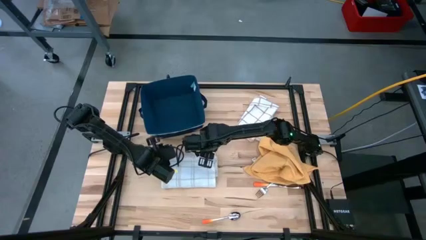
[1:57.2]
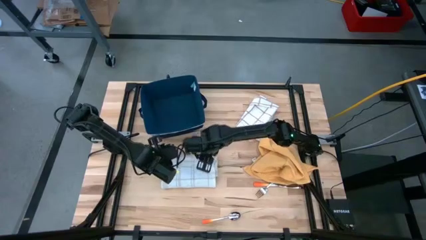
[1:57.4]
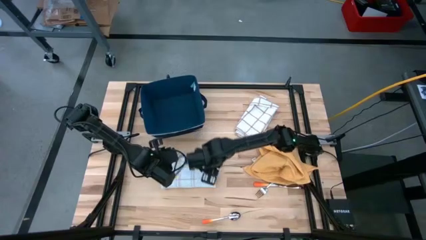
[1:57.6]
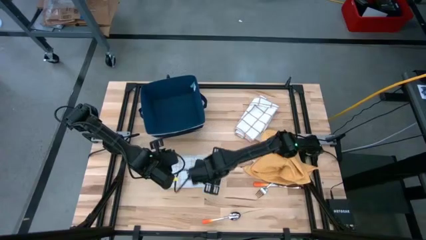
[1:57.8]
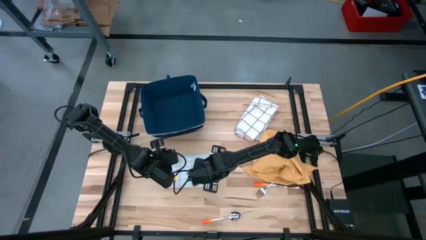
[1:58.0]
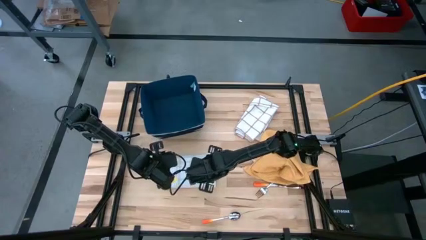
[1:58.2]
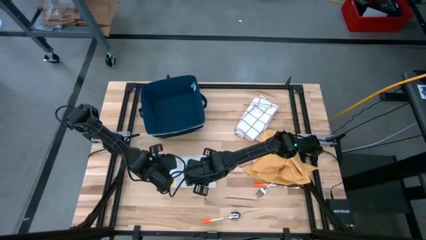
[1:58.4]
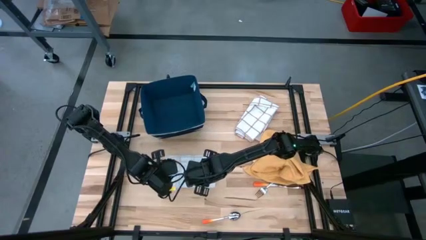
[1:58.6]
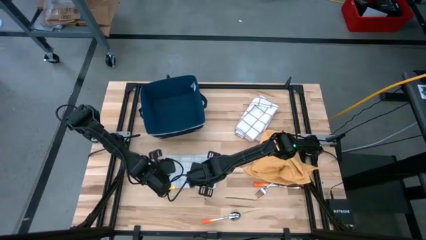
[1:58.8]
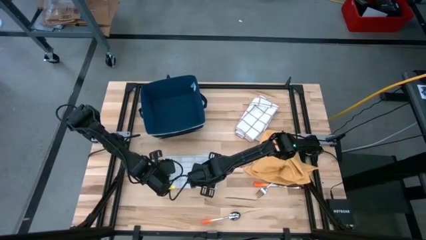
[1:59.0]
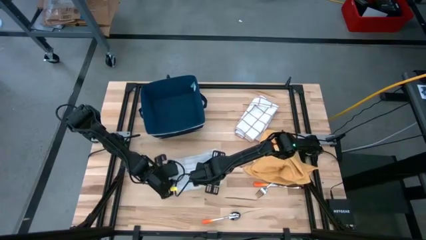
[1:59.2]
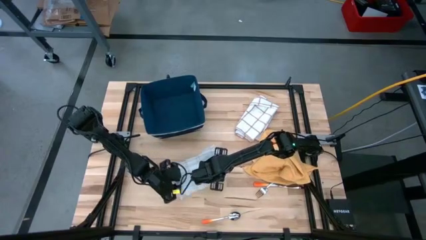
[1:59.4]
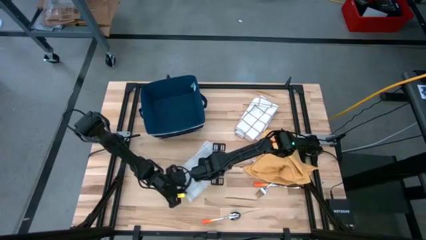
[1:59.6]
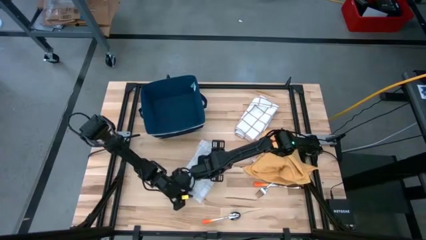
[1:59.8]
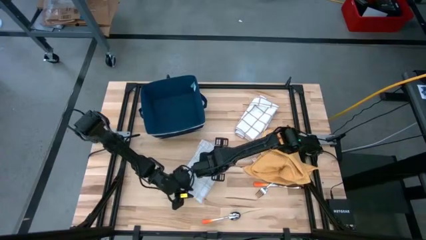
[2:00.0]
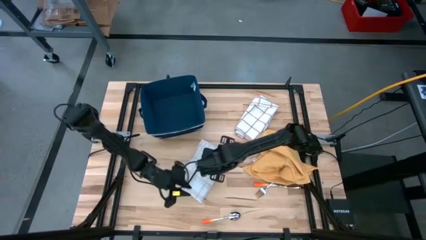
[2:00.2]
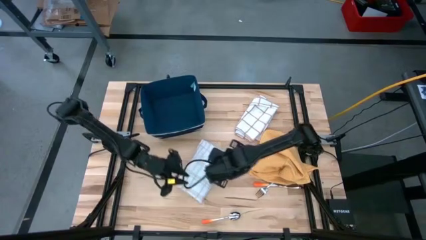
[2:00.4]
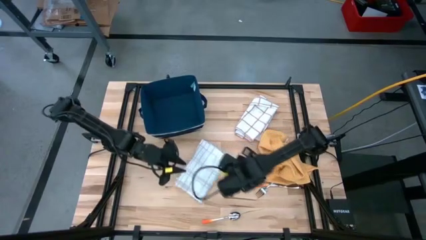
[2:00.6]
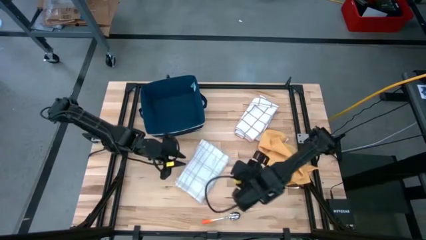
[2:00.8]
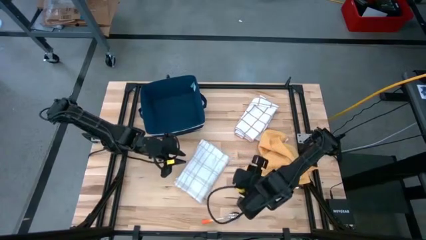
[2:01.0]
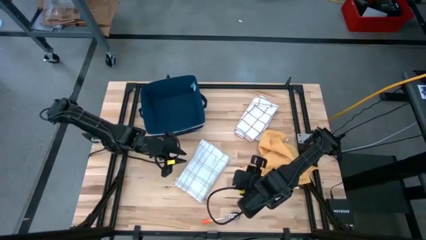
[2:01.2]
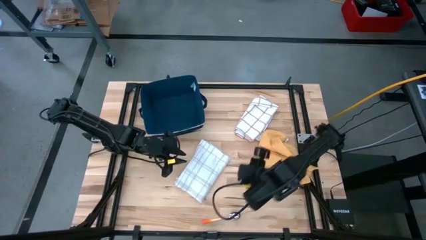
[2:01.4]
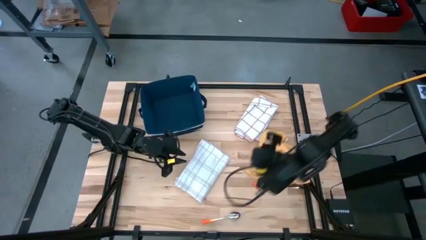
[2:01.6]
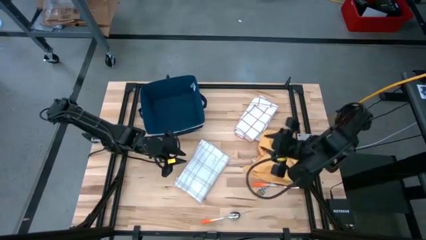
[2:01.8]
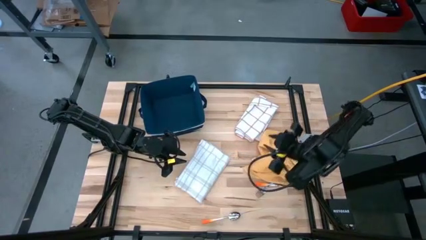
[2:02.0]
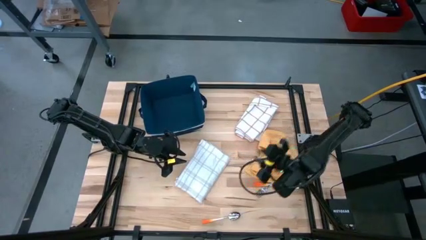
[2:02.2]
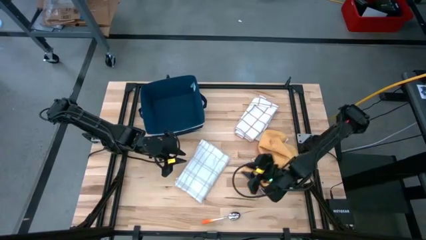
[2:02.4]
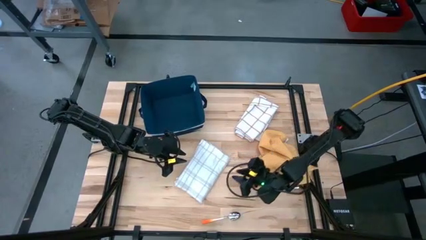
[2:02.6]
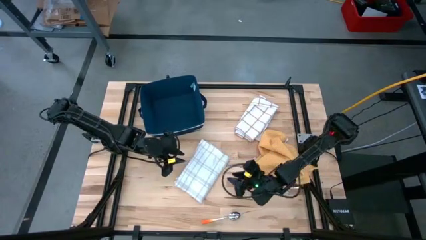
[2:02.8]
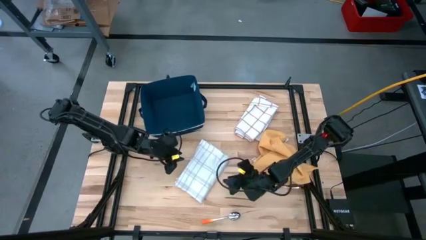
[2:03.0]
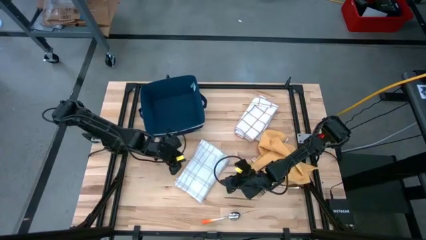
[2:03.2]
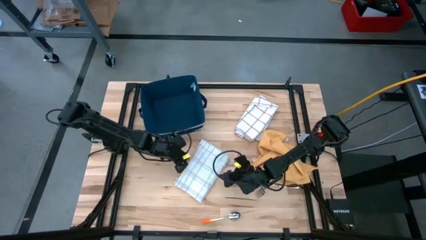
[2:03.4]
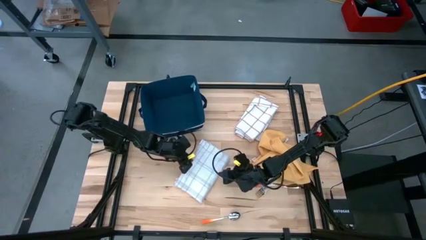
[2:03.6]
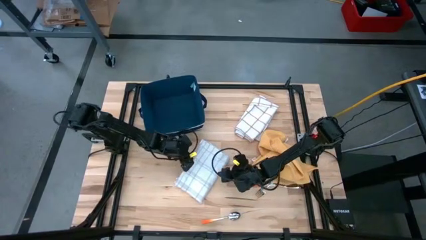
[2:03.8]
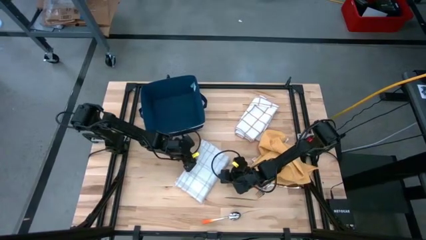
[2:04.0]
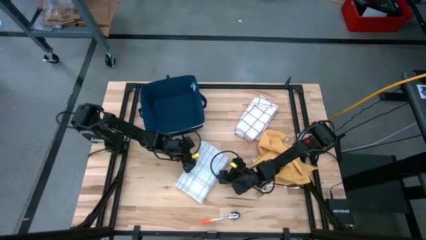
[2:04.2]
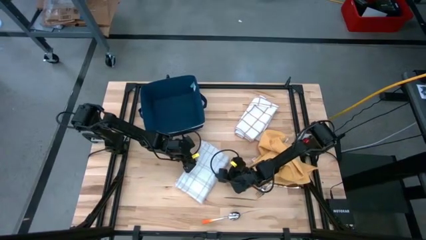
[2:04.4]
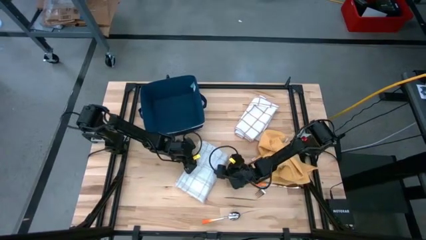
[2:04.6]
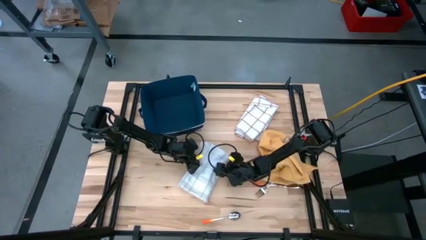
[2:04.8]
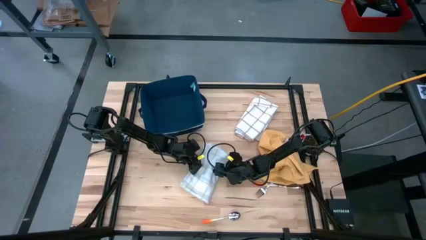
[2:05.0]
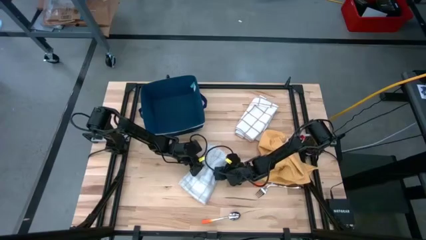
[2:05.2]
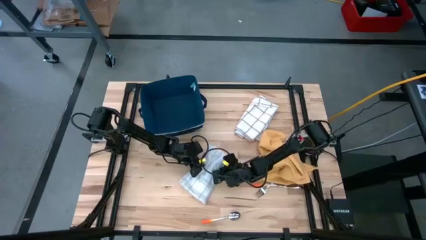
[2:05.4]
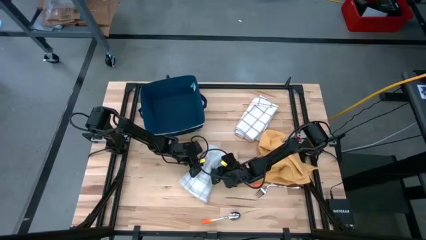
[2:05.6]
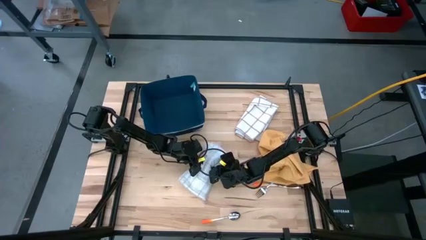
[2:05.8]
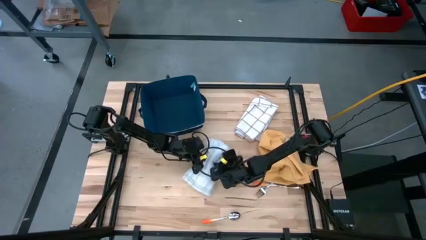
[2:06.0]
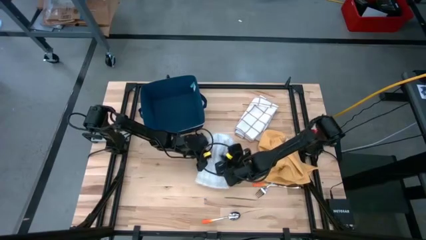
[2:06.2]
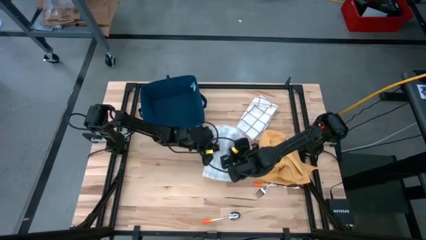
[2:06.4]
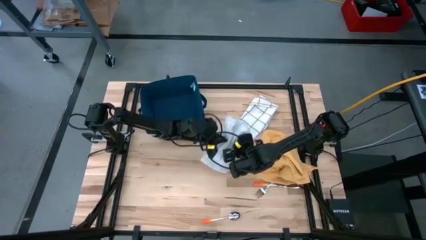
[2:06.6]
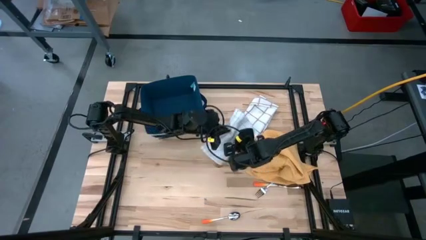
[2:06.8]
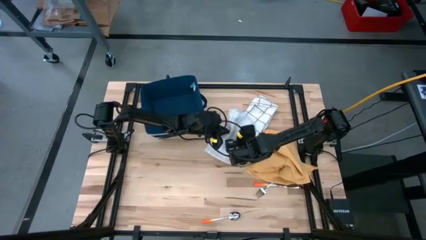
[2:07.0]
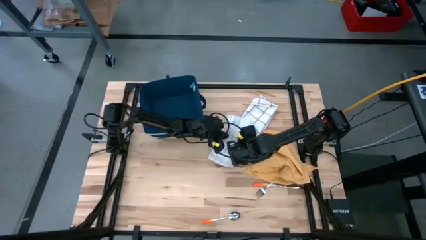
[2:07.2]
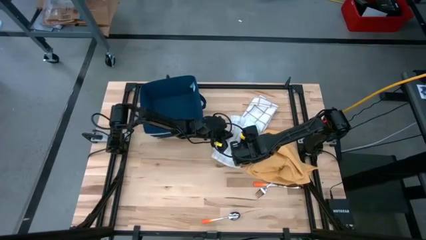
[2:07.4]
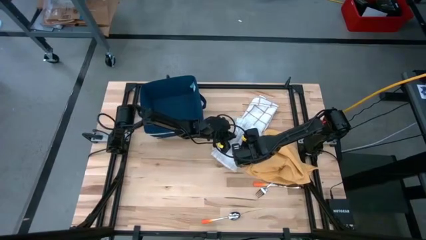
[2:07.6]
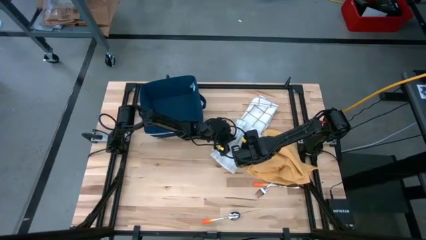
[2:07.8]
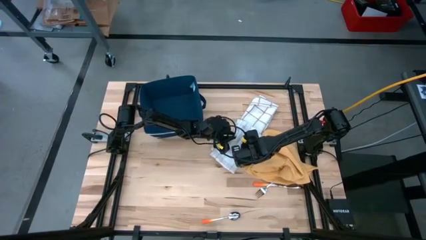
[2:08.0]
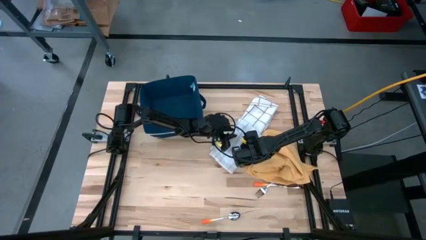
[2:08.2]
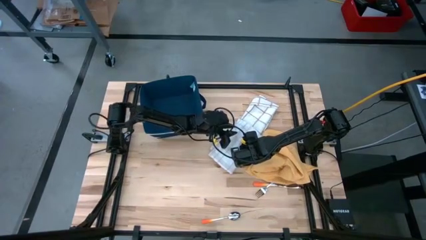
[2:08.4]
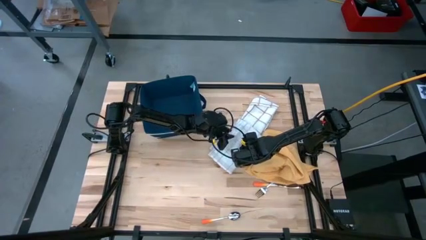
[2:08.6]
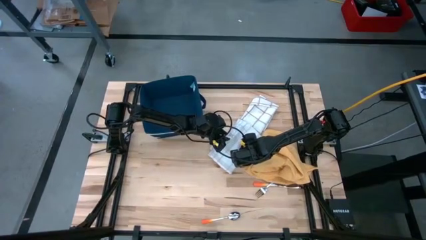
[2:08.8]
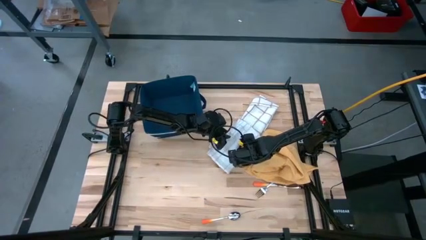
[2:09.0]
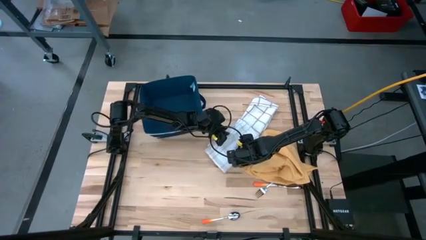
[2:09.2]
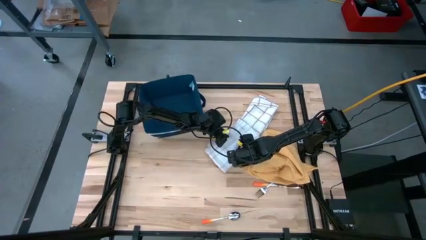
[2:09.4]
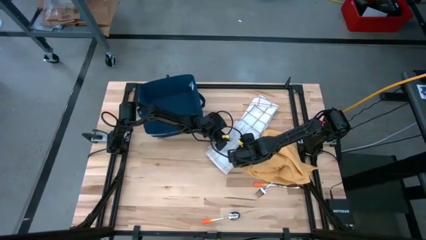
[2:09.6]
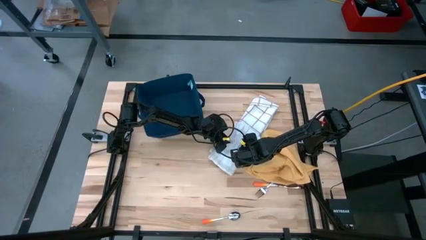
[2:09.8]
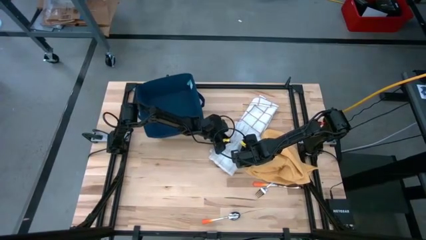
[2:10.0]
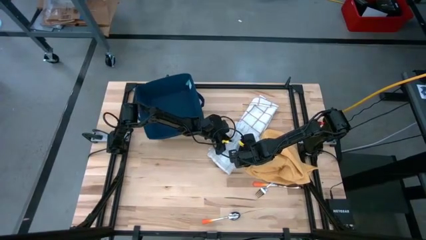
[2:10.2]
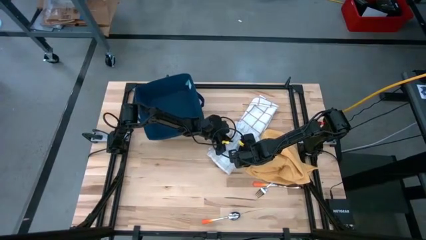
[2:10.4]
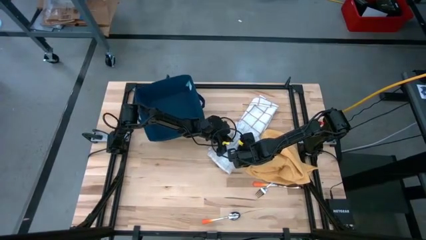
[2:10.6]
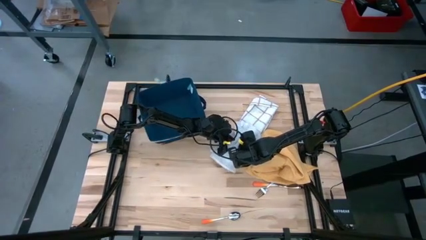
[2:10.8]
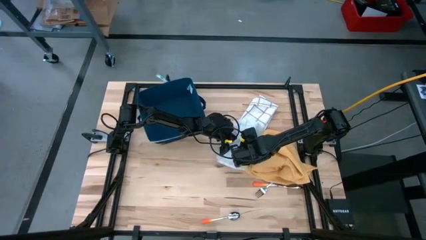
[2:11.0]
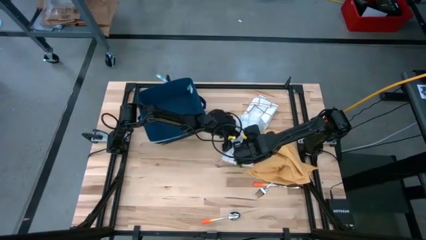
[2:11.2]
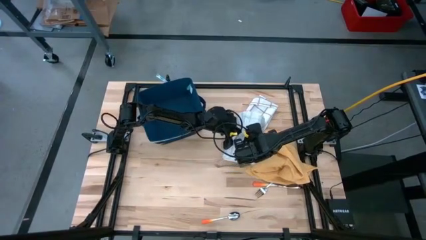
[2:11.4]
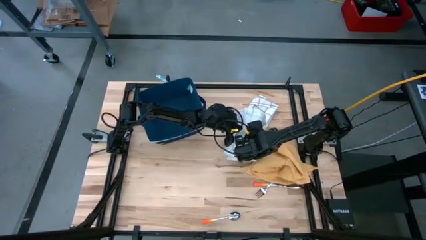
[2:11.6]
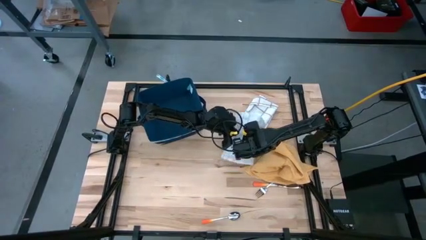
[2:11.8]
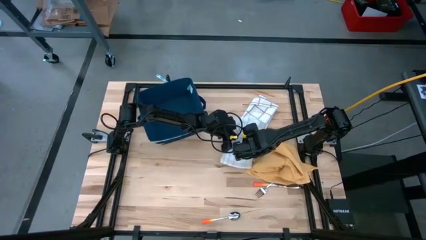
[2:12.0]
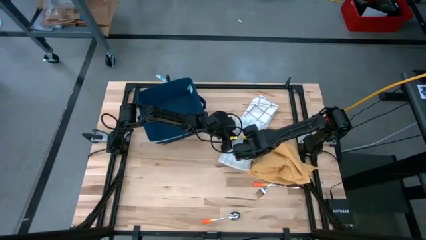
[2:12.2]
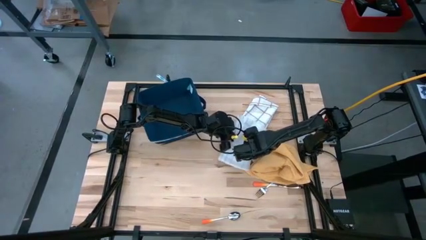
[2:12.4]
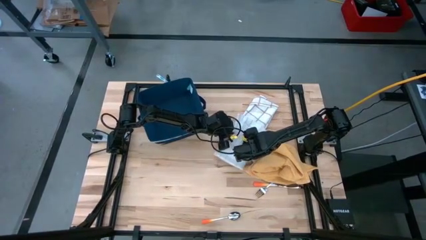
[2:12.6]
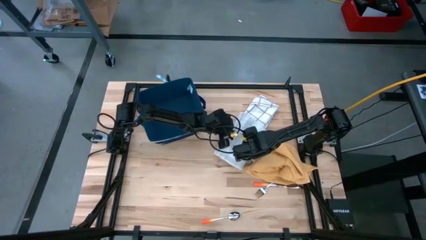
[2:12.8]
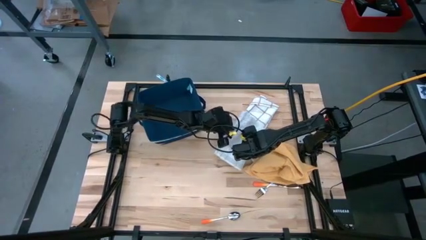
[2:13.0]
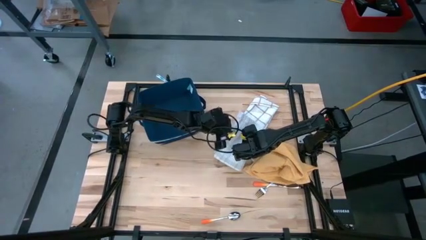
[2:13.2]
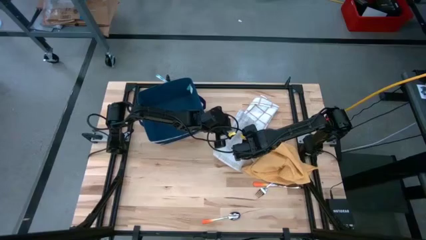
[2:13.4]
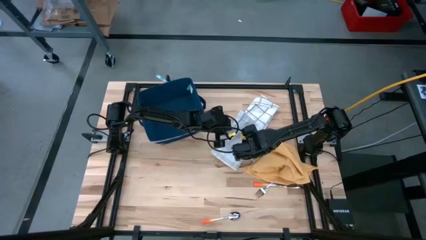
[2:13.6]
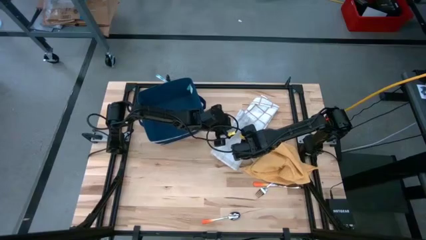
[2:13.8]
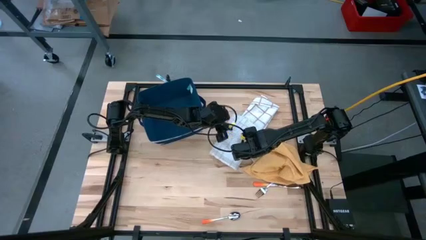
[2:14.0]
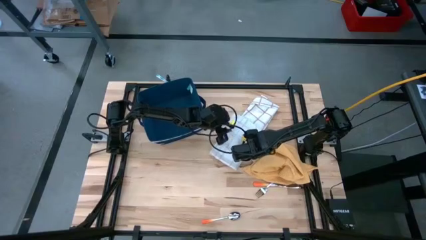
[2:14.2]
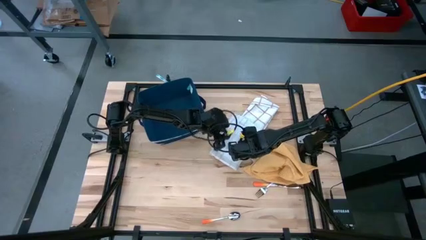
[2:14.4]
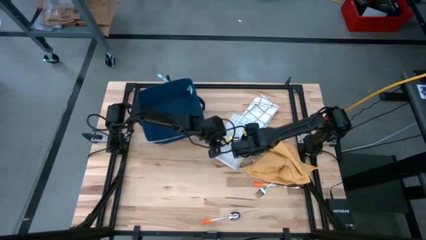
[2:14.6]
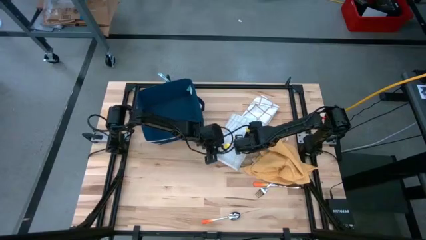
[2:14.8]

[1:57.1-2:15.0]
Task: Fold towel
Stack the left white patterned towel on the right white patterned towel
